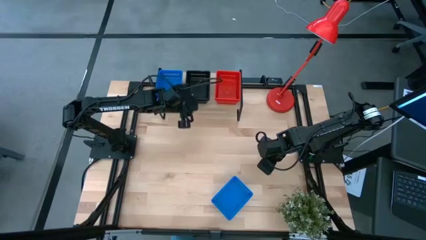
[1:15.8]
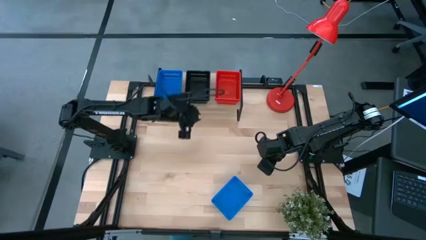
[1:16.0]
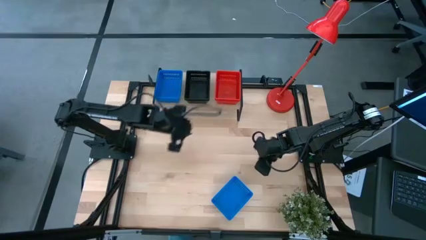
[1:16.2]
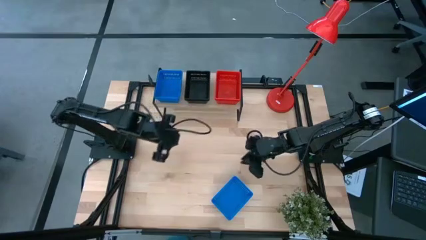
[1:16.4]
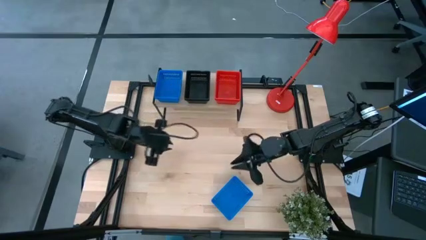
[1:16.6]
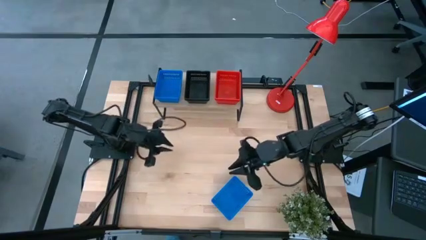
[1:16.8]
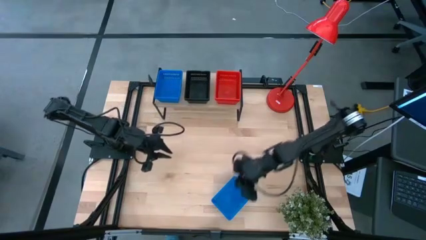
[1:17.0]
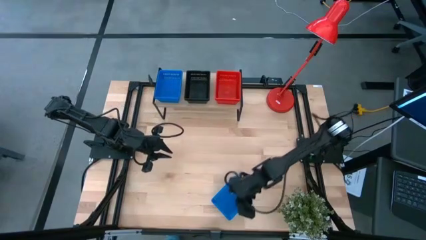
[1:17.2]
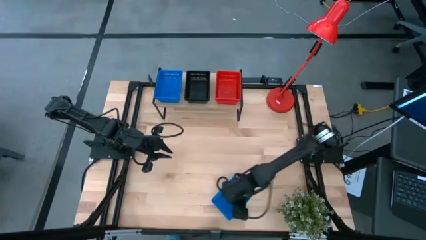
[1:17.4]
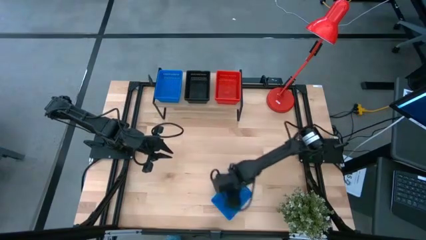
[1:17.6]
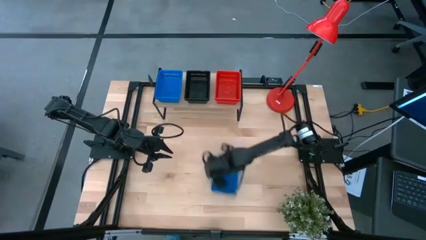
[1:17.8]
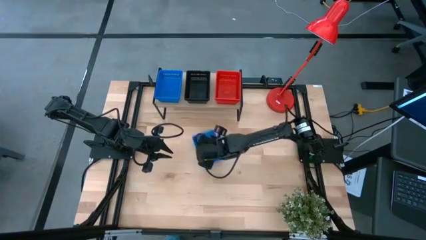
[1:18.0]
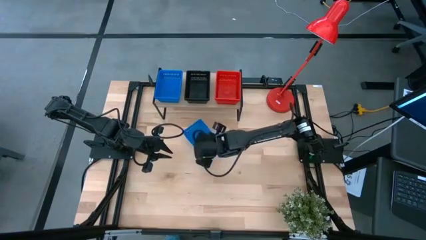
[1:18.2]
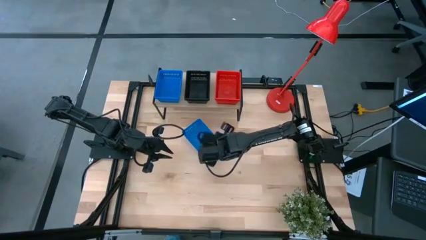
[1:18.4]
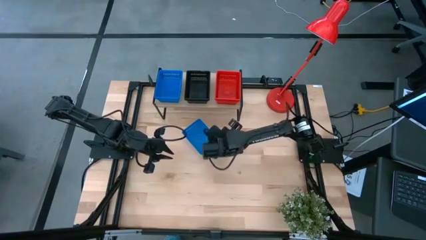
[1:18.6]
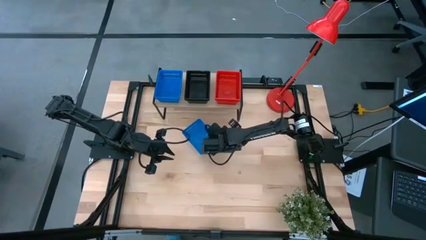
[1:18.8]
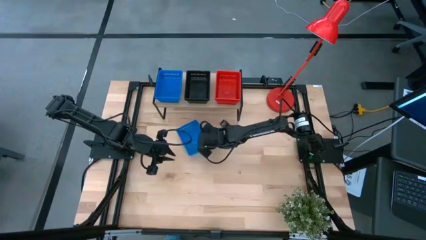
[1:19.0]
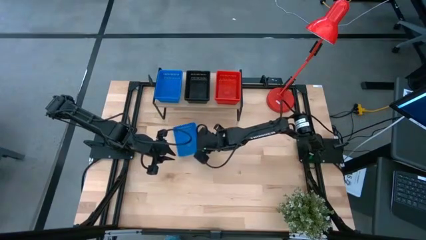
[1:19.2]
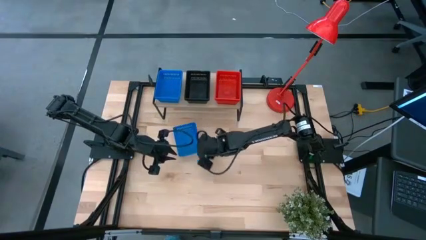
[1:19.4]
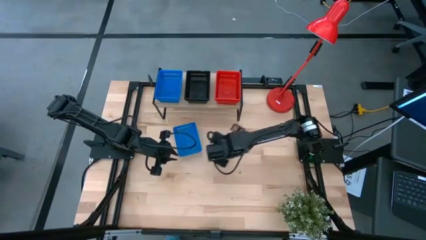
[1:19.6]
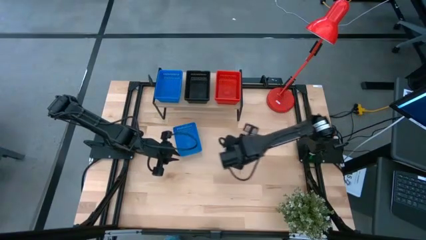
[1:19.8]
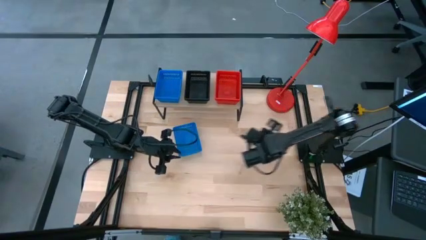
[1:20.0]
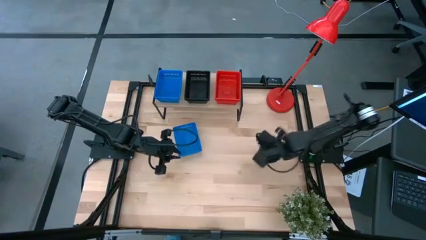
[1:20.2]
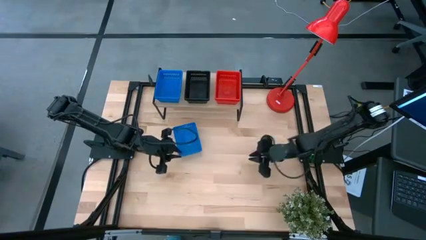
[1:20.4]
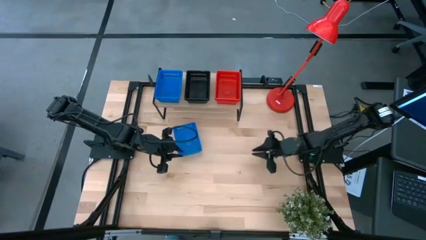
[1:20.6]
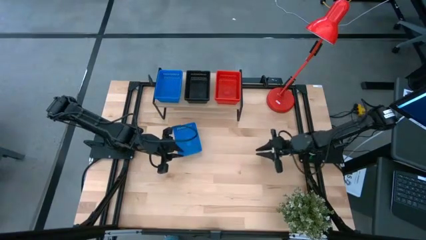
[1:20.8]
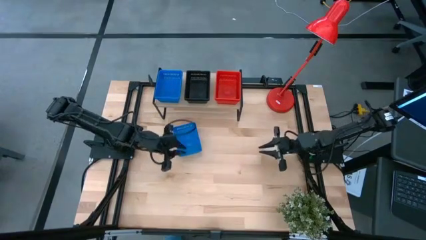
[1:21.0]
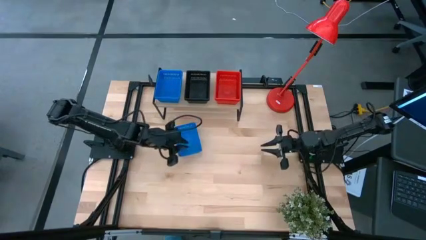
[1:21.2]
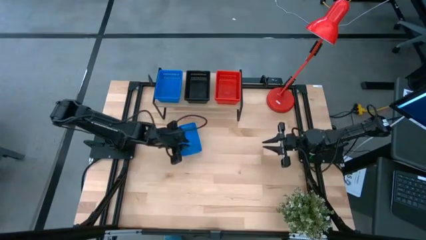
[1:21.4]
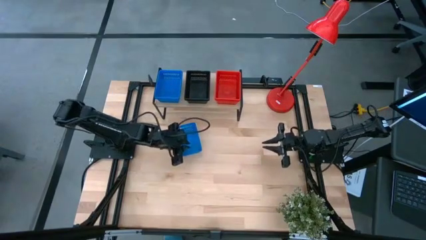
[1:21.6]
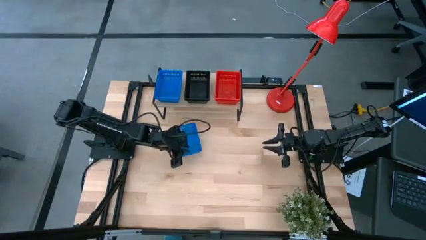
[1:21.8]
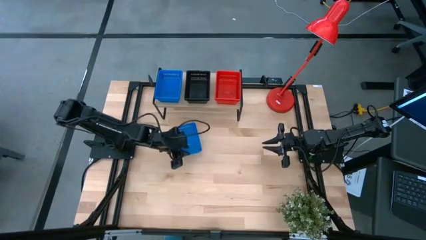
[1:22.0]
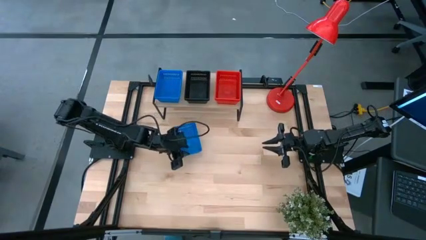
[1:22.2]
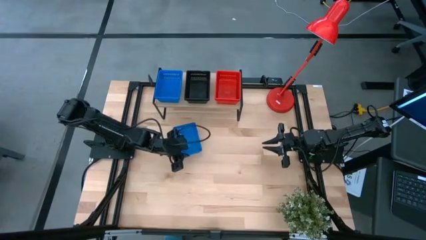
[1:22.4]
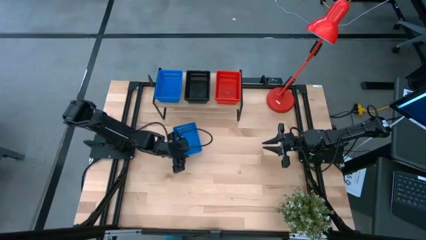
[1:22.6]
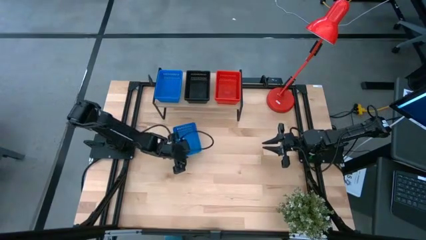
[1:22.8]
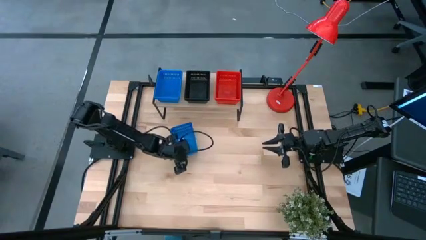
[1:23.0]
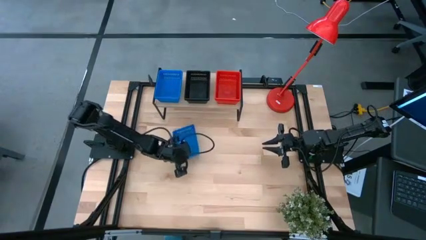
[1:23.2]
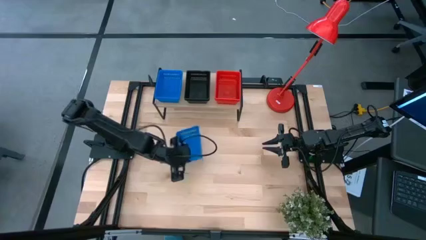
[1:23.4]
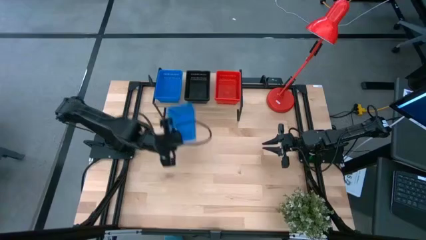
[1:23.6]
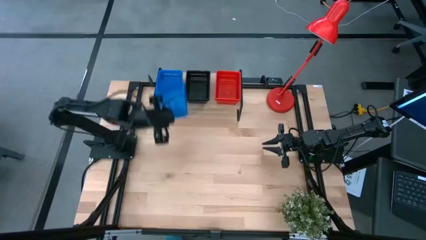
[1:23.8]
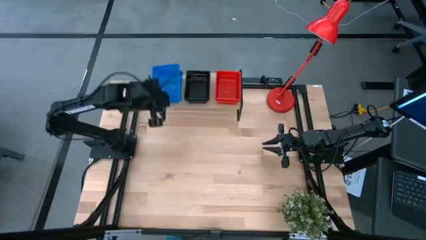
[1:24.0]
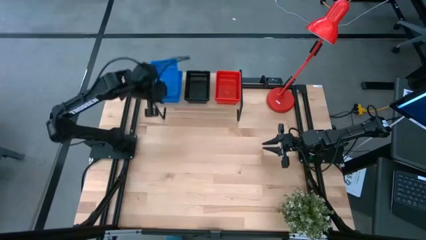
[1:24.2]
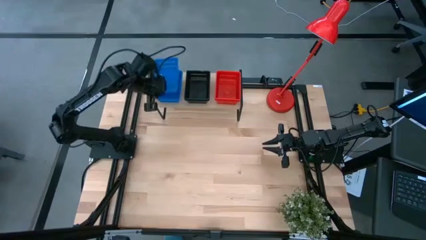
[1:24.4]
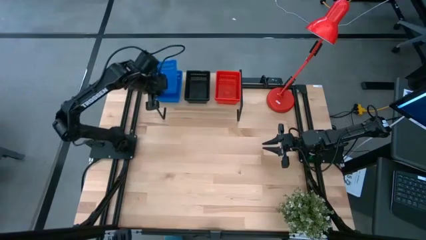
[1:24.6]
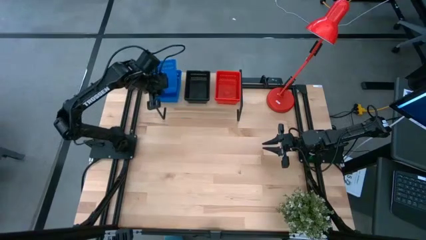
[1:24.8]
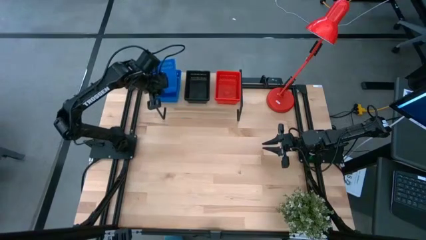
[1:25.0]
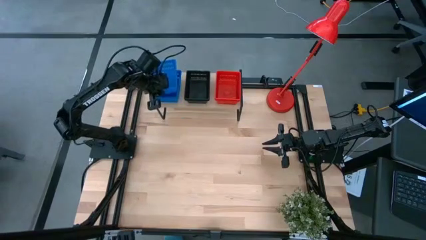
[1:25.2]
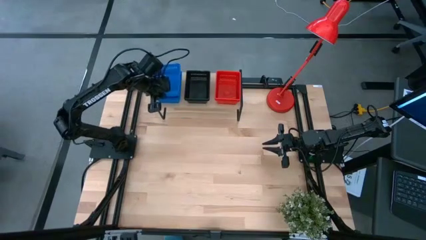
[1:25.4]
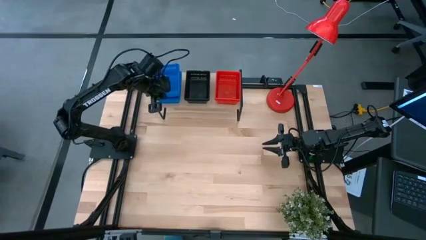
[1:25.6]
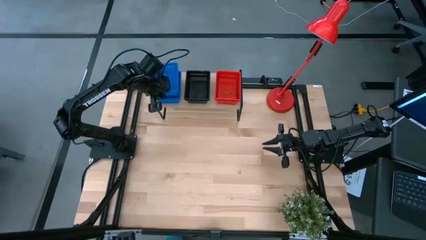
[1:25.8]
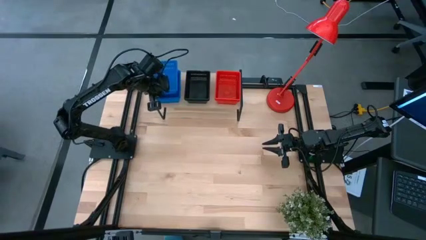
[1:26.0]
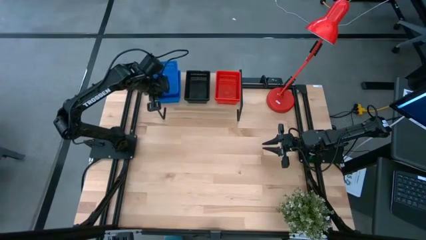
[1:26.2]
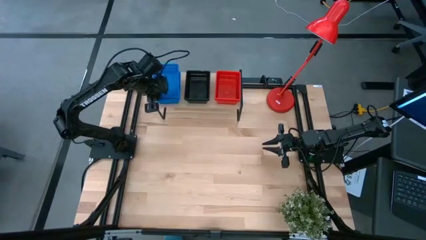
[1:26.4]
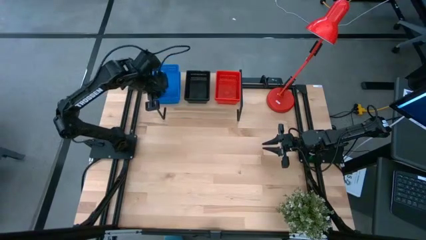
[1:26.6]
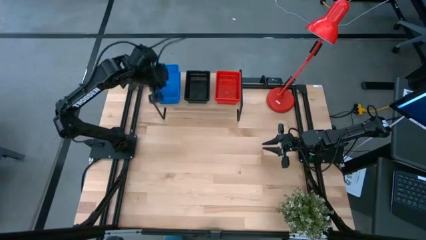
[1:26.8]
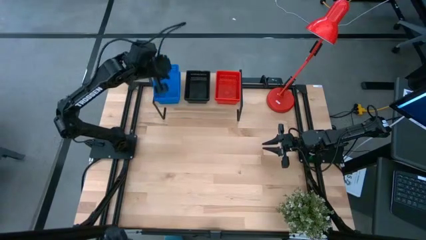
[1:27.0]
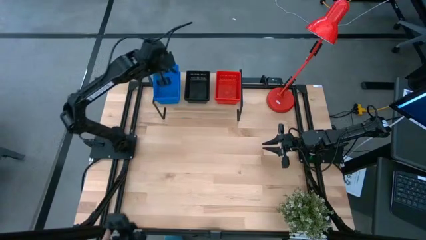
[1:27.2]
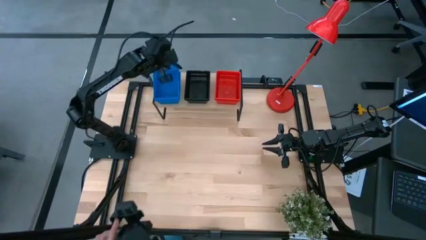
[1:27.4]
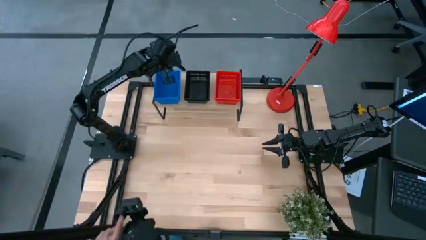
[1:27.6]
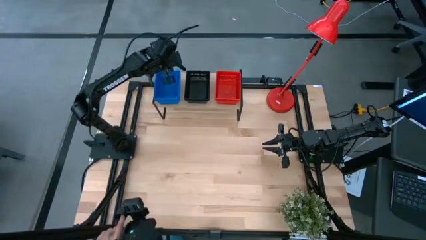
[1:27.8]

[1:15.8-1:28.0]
Task: Stack baskets on shelf by color
Stack the blue bin on top of the blue bins on the shelf

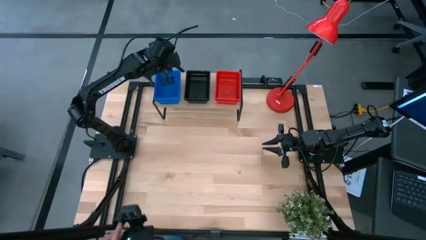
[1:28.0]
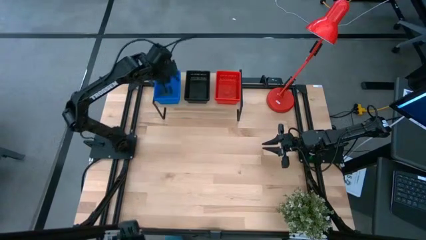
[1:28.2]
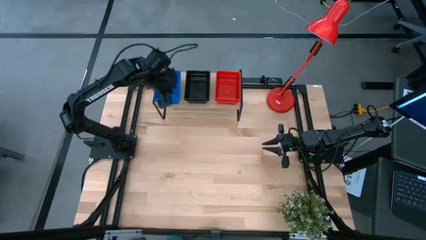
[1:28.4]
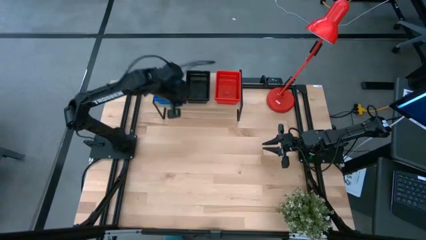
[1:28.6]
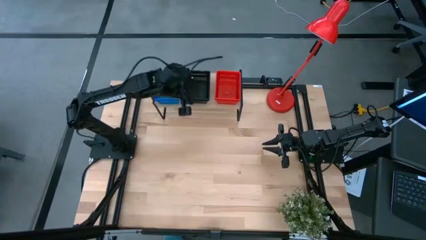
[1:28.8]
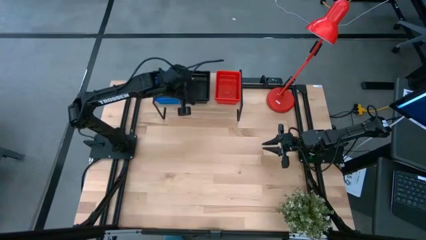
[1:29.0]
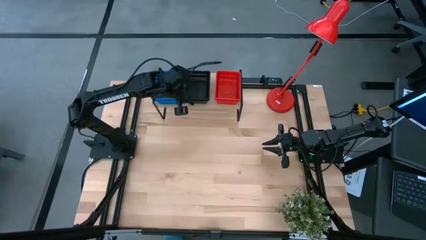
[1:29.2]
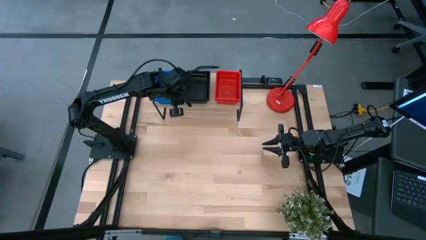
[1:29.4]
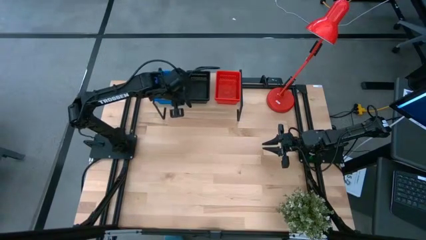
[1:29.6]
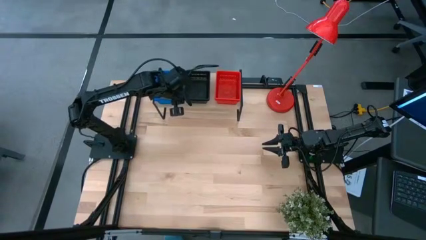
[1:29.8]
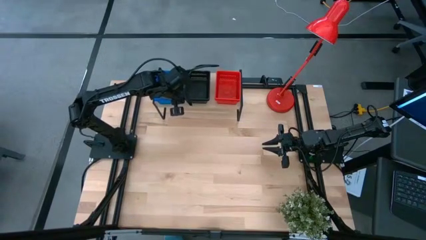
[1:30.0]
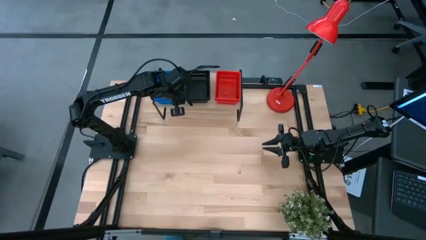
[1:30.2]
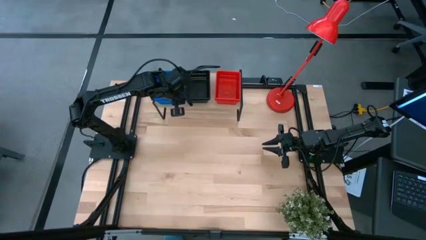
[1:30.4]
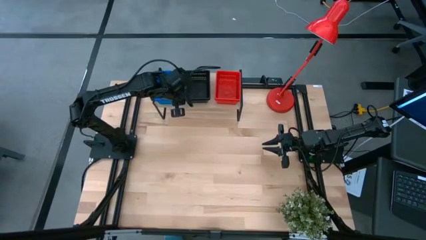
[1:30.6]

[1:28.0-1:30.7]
Adjust the black bins on the shelf
